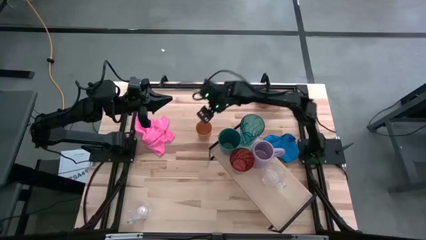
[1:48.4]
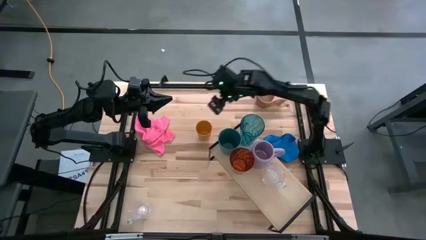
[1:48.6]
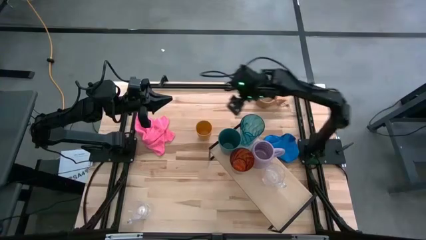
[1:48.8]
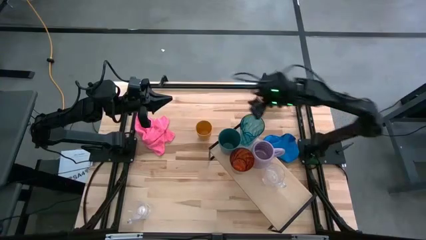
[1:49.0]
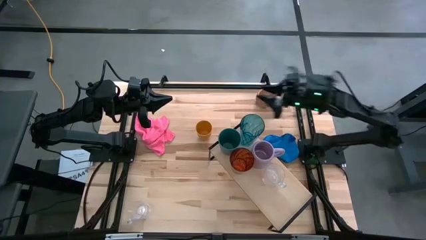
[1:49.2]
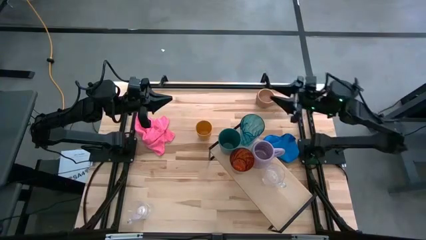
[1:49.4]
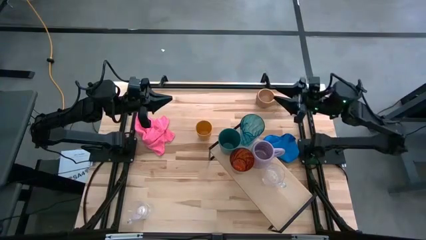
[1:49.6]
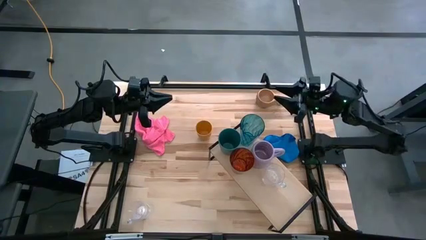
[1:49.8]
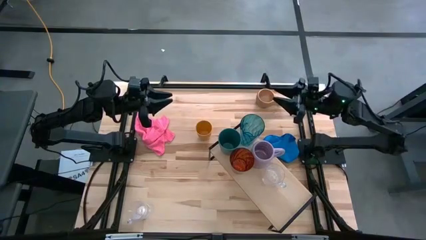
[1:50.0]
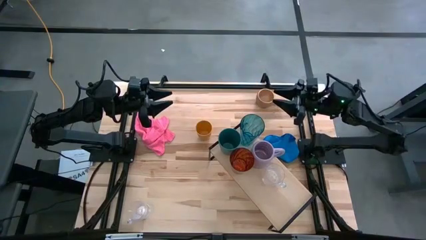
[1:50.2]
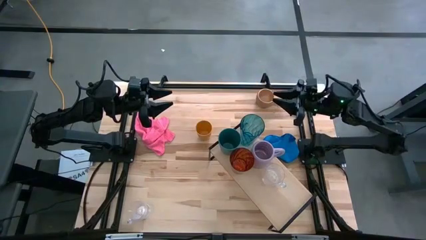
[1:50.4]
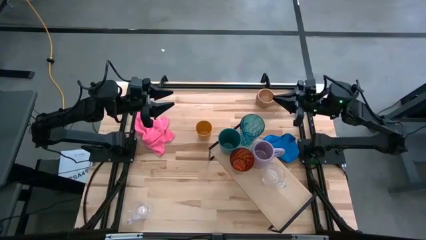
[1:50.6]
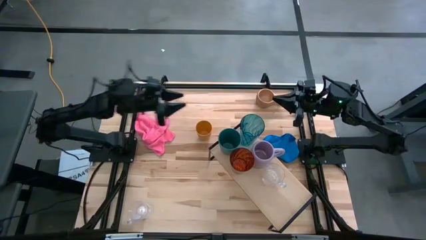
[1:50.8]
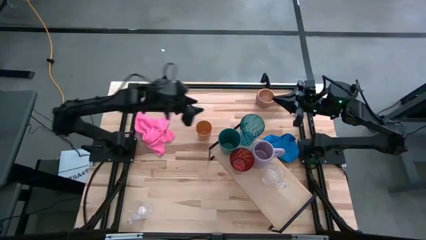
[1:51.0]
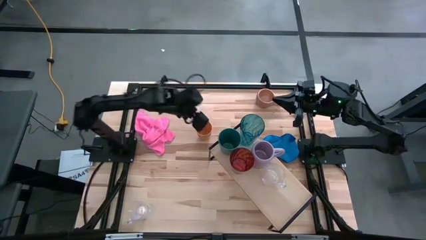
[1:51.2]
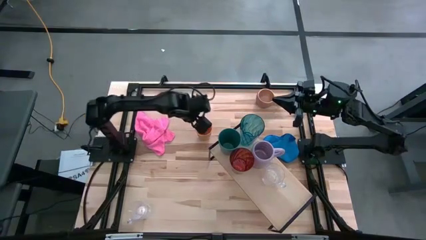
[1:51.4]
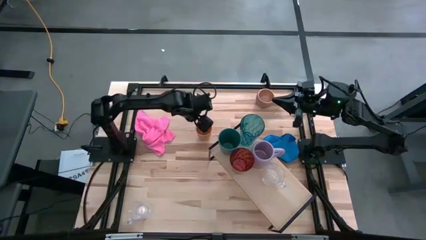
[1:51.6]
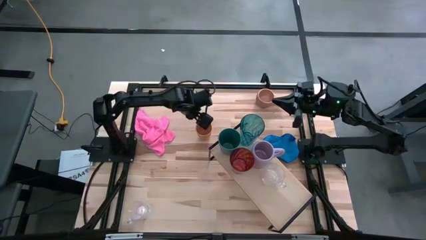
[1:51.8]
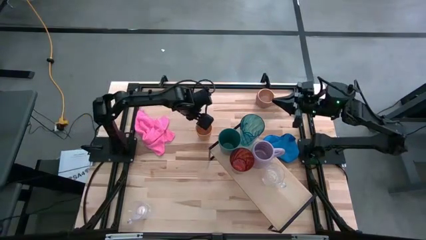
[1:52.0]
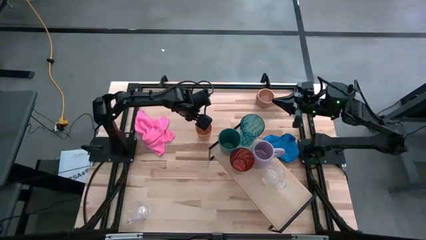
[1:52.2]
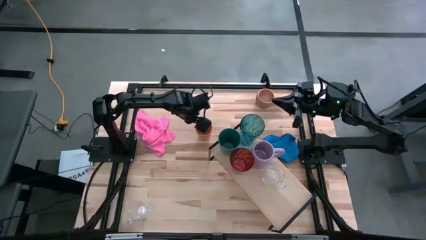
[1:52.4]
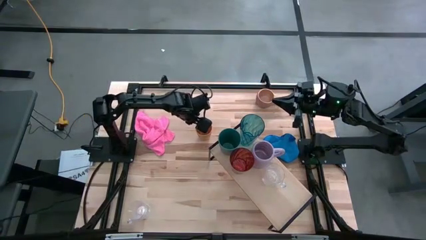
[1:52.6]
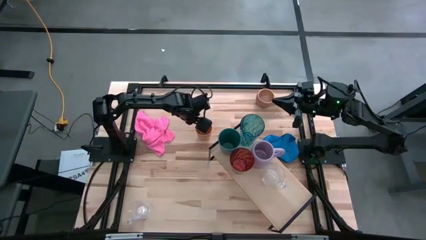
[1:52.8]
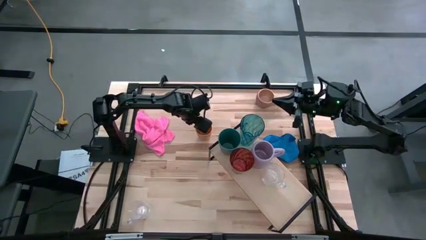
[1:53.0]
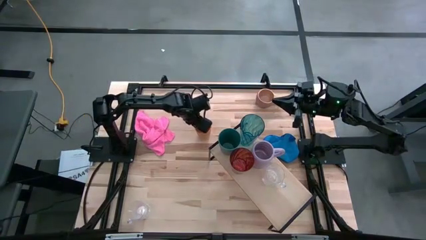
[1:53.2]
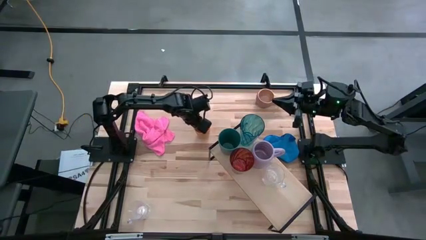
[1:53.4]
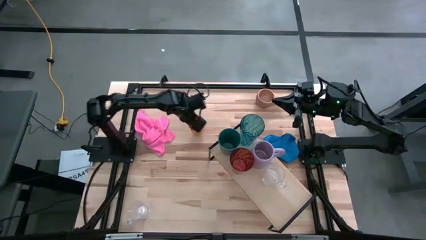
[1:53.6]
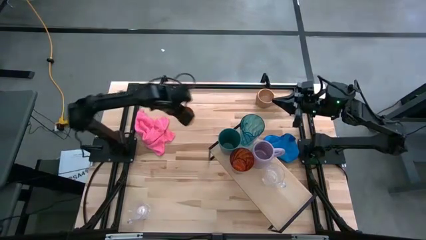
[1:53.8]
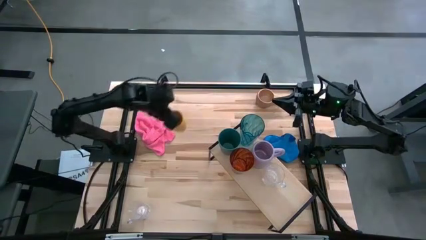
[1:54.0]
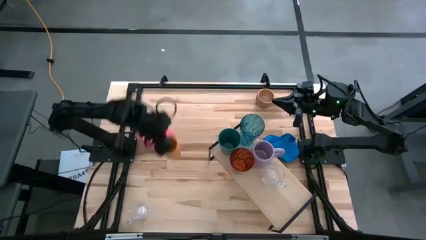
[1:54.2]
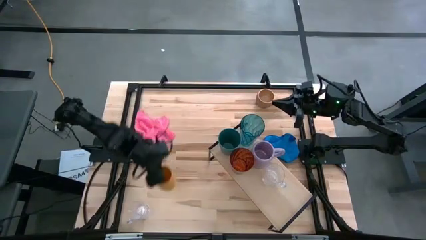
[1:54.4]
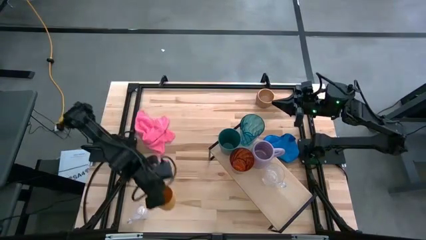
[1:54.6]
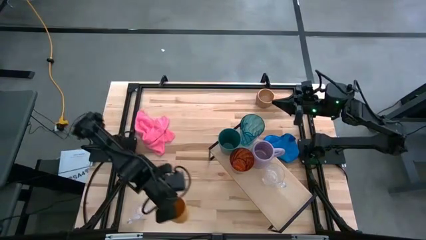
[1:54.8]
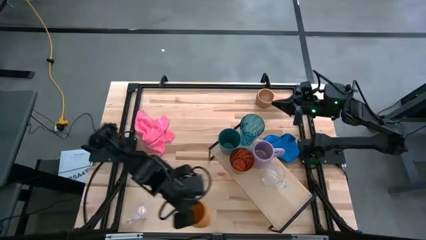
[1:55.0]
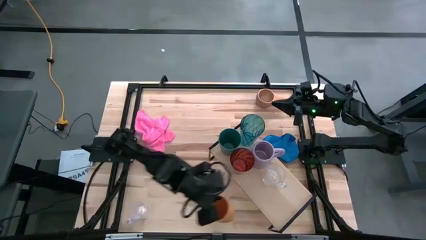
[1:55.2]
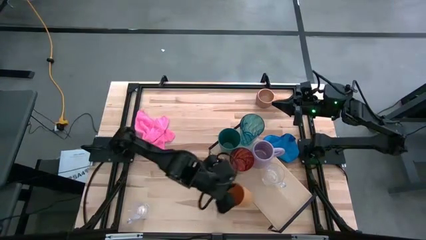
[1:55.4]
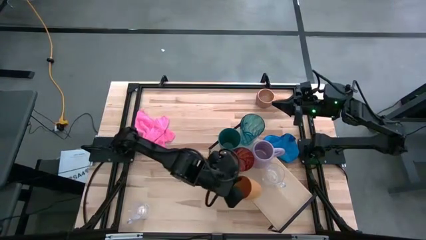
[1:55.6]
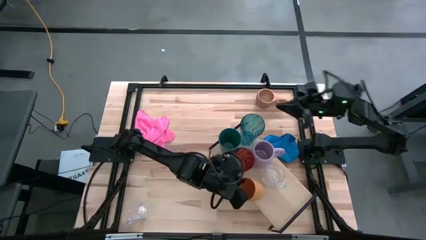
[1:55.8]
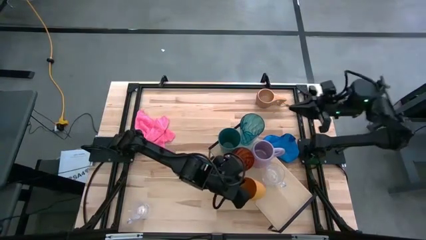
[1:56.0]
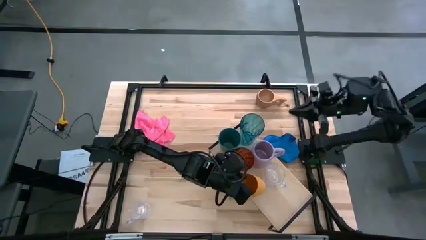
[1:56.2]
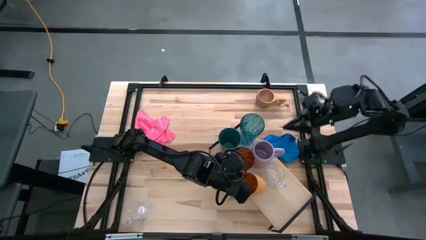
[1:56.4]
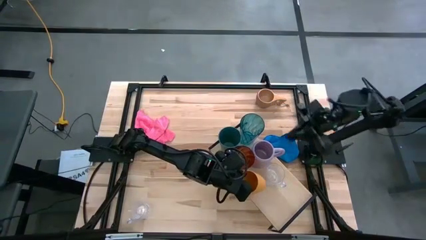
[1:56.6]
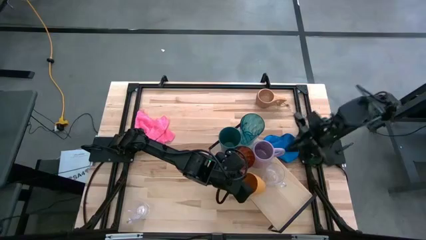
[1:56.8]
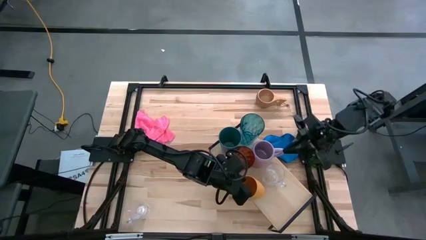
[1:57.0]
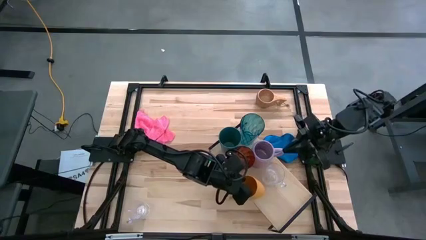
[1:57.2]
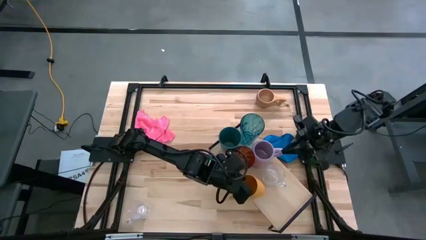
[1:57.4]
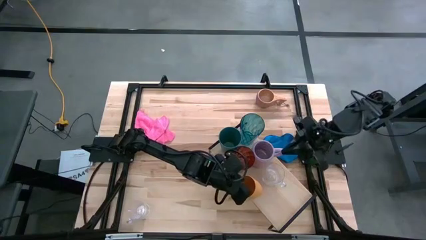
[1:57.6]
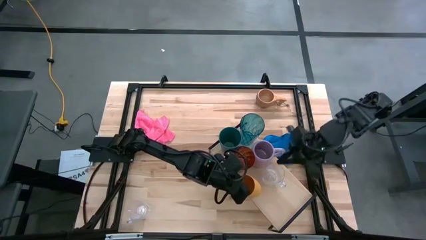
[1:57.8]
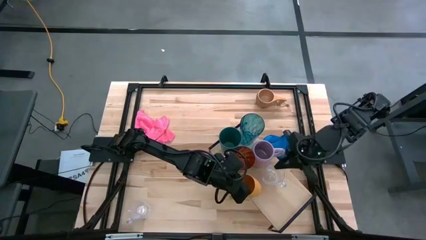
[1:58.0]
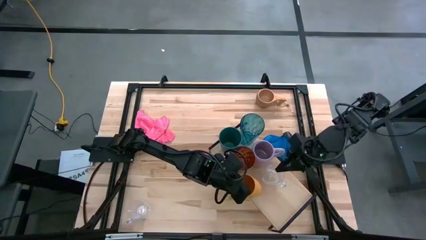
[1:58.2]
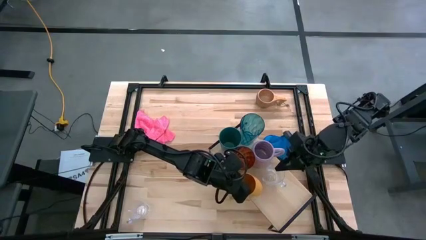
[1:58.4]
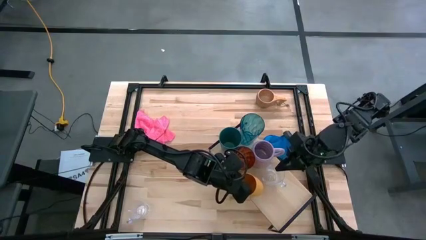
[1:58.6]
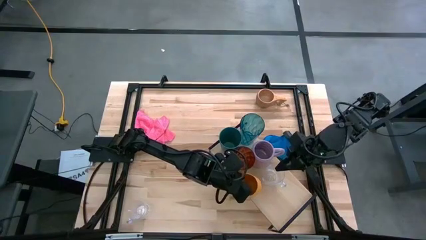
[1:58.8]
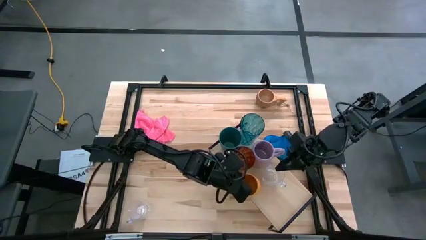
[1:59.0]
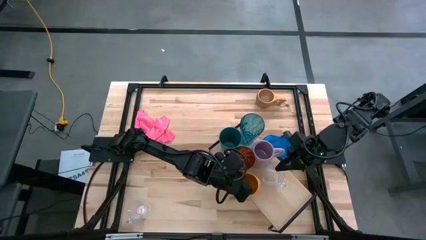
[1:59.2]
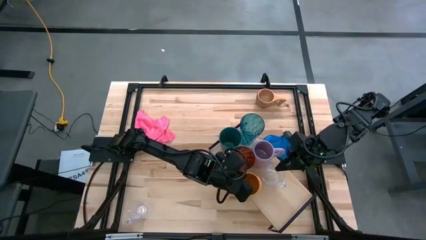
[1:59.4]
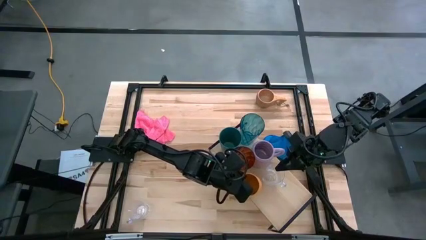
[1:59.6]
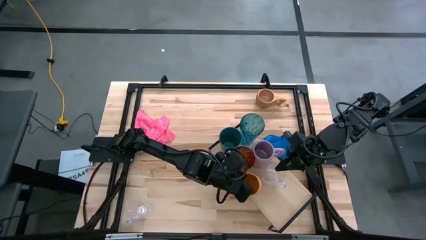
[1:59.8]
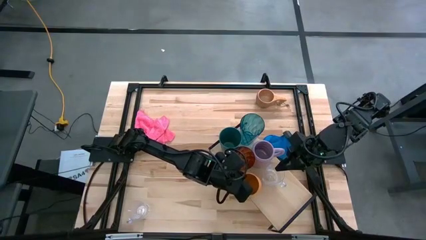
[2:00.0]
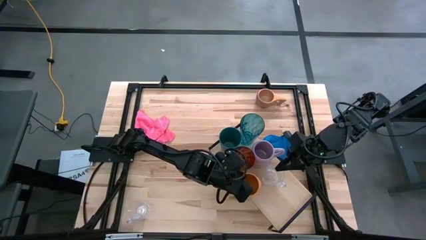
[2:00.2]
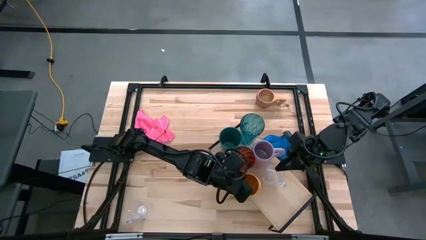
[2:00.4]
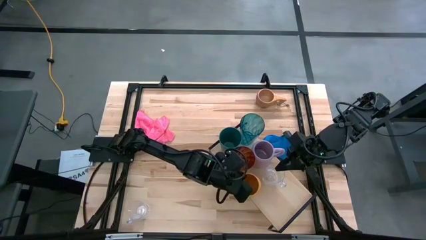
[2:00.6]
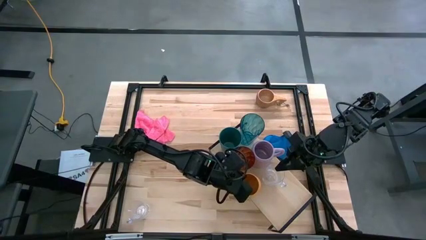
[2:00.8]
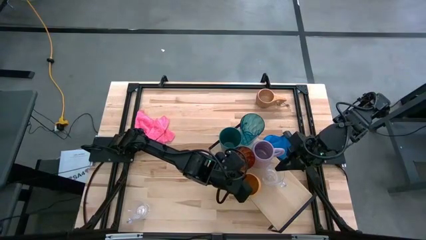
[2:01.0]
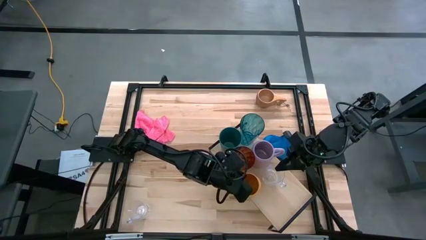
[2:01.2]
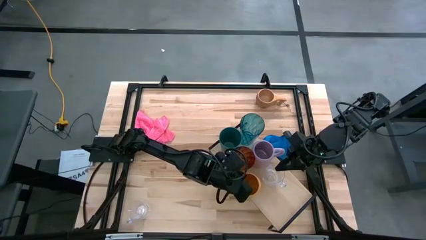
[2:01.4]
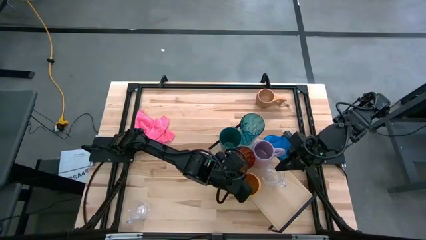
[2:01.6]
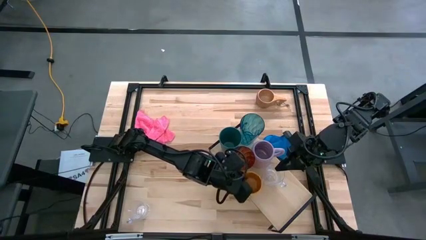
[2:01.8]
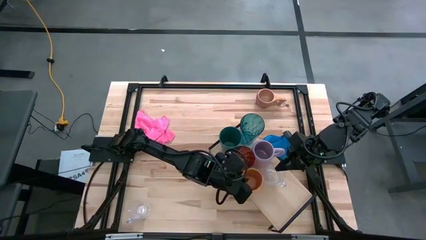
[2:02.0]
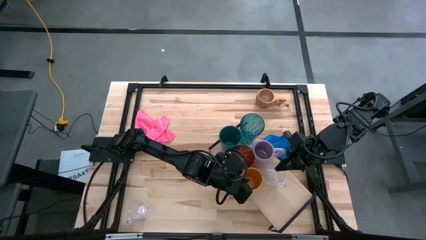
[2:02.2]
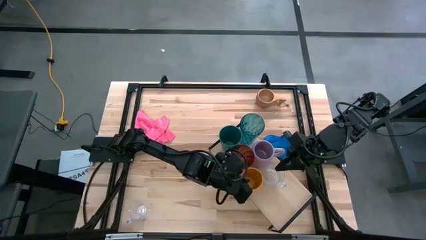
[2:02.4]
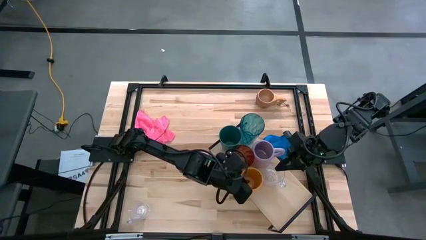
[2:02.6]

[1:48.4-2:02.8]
Task: Stack small to large cups/mugs on shelf
Put the orange cup on the shelf
